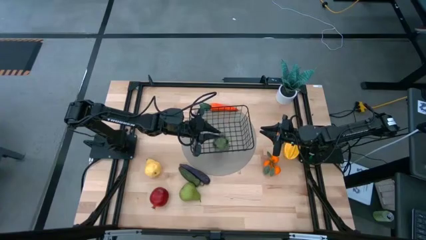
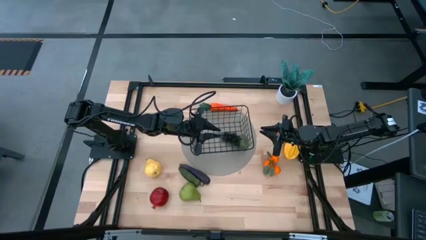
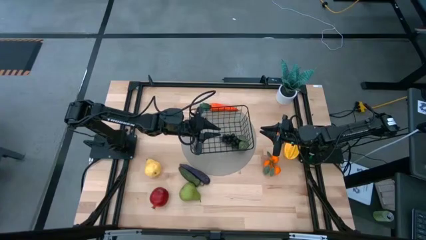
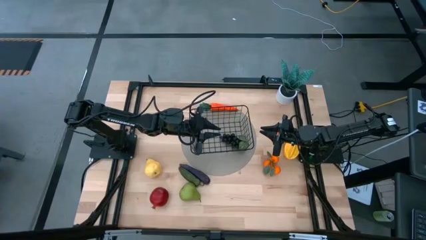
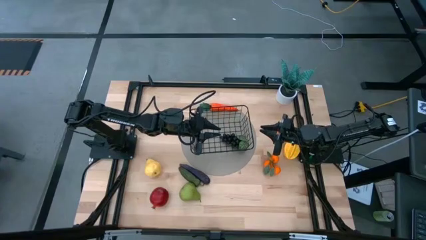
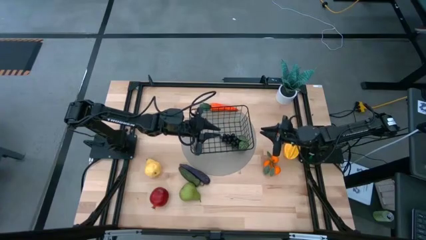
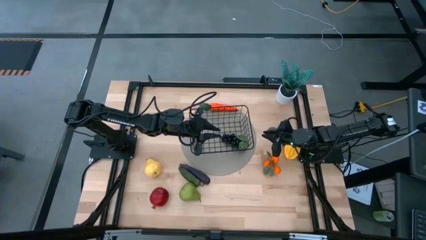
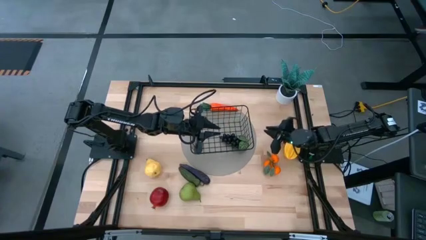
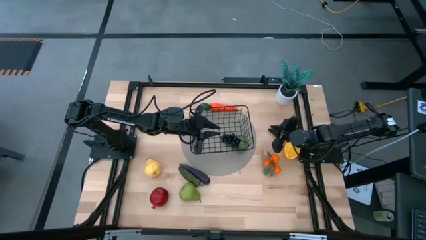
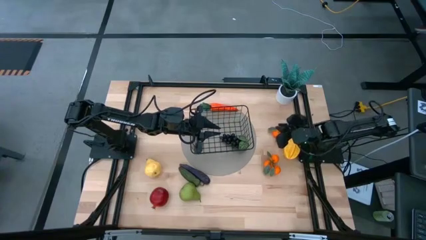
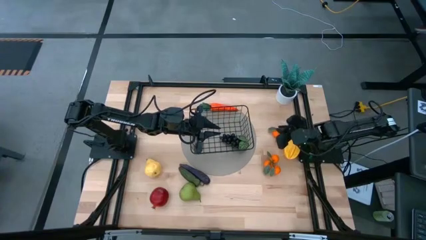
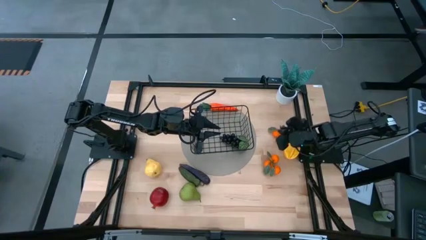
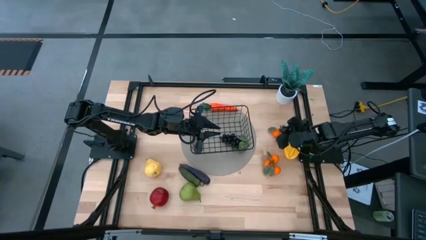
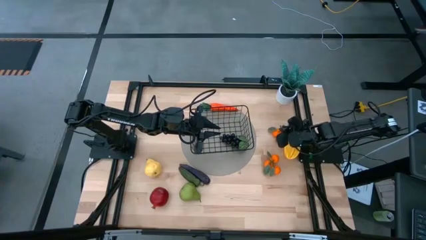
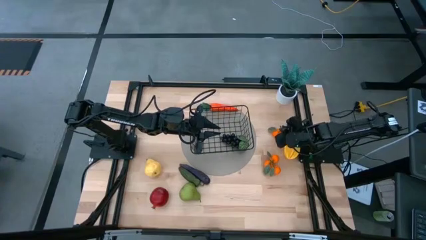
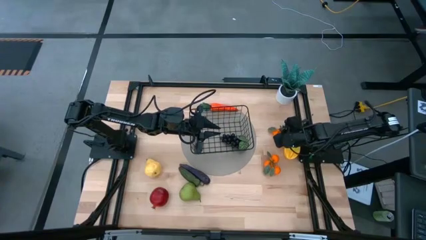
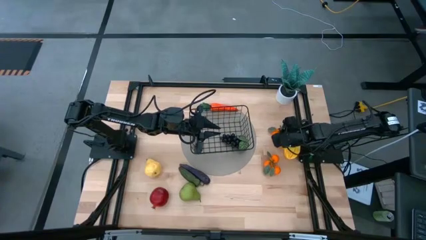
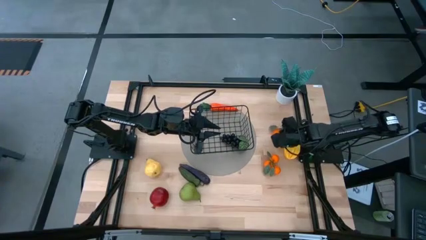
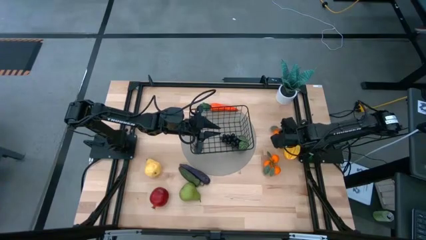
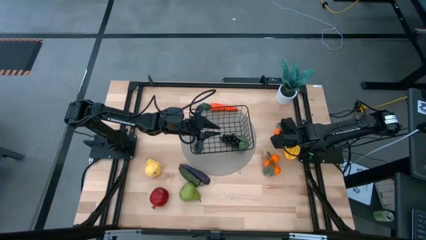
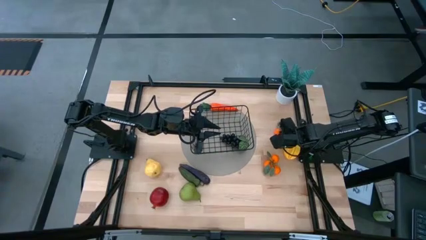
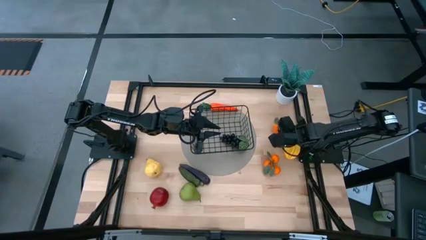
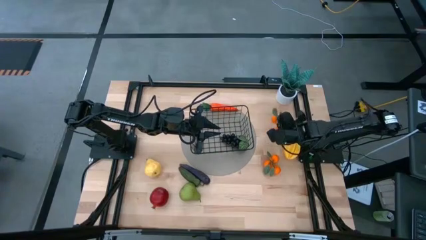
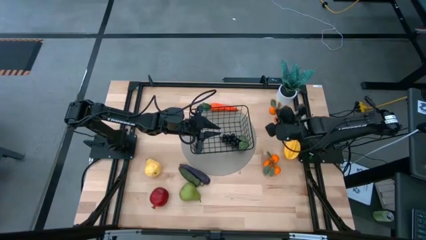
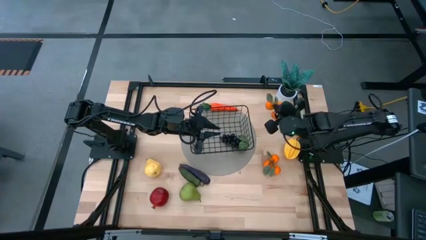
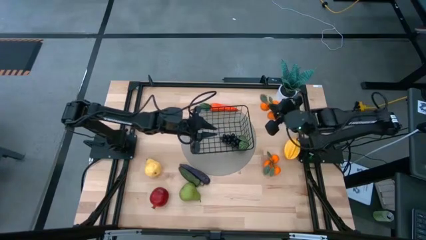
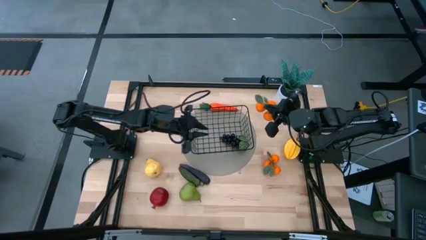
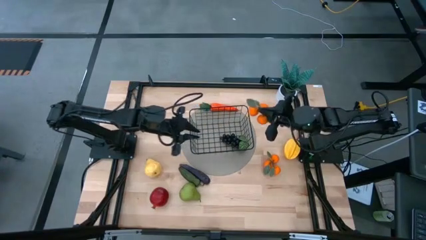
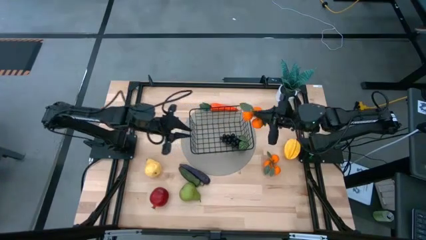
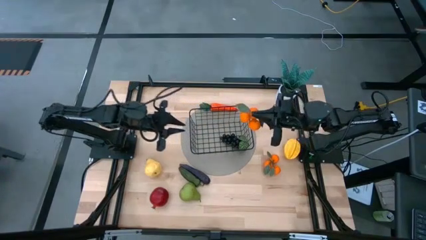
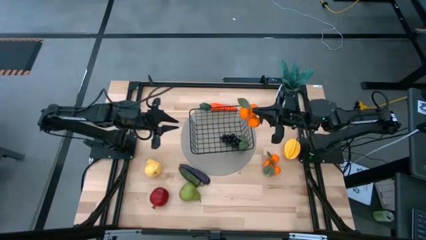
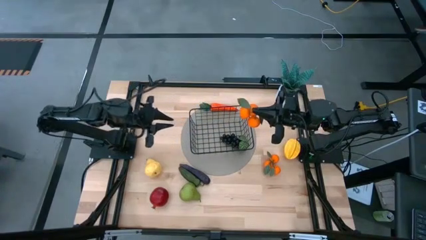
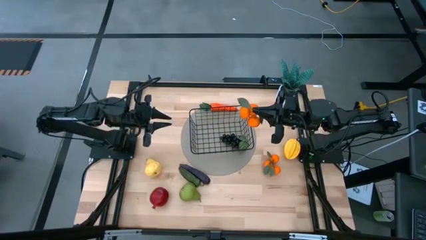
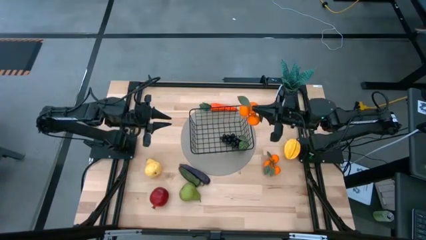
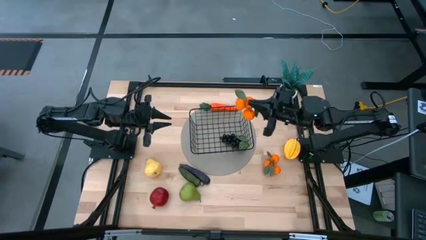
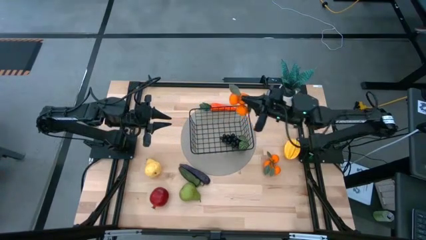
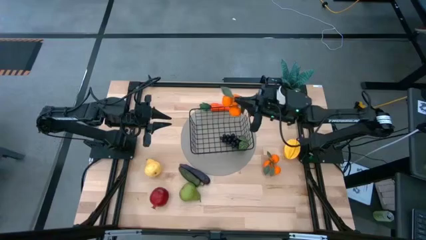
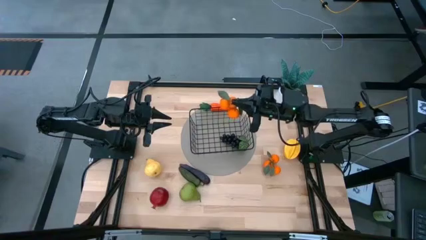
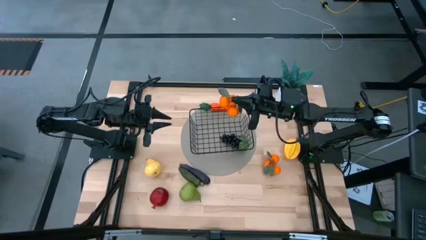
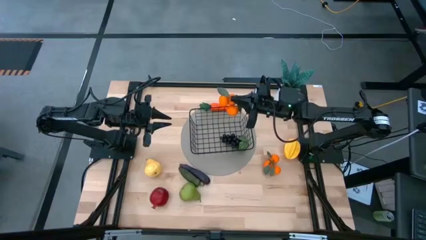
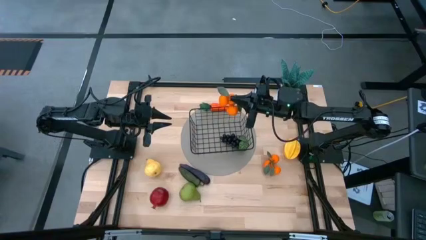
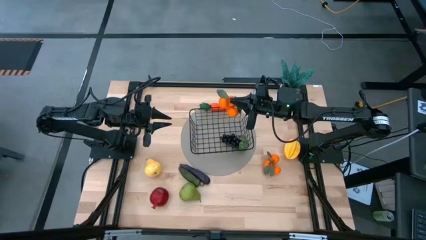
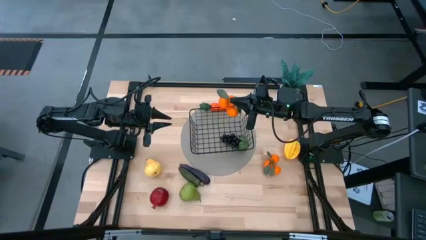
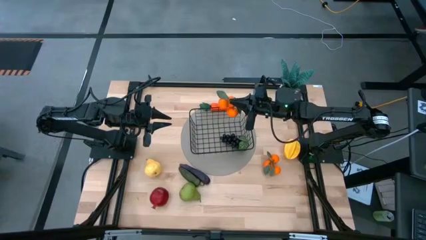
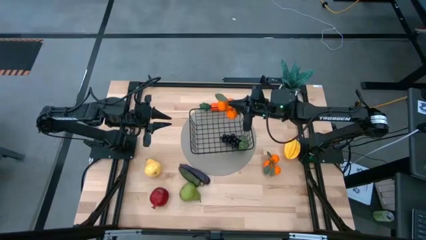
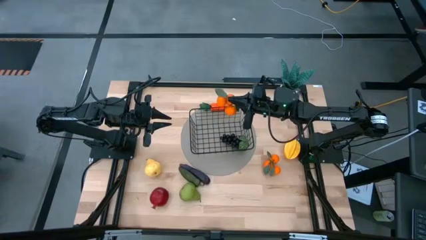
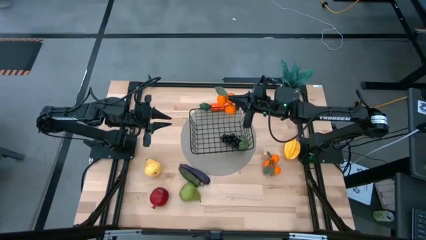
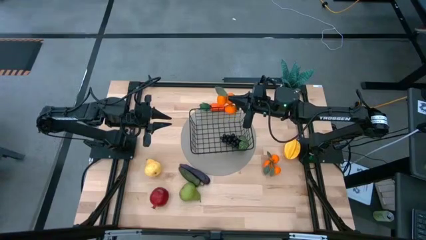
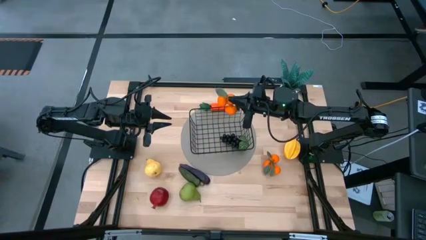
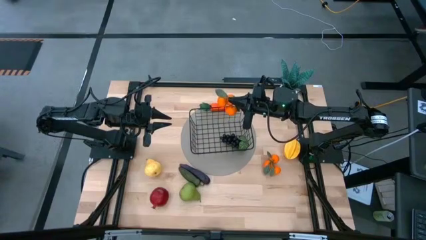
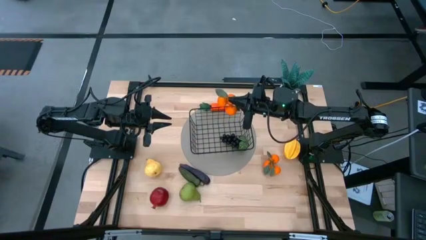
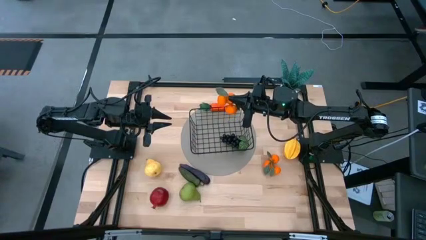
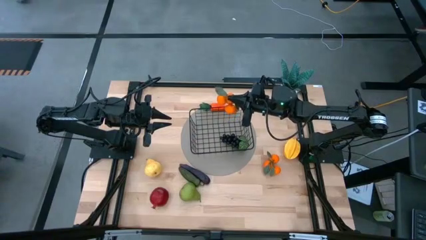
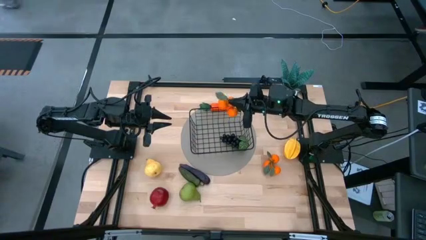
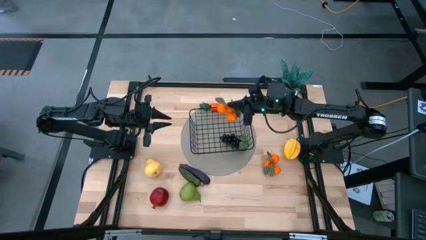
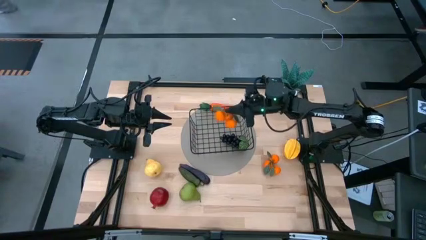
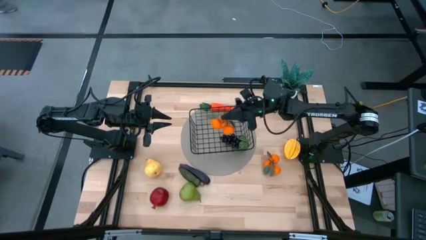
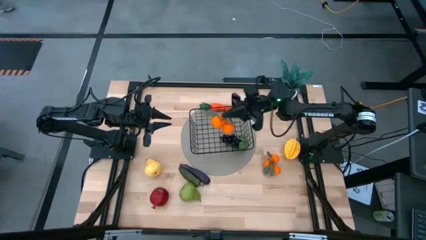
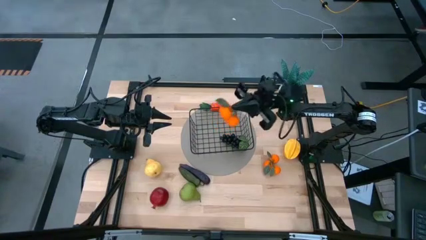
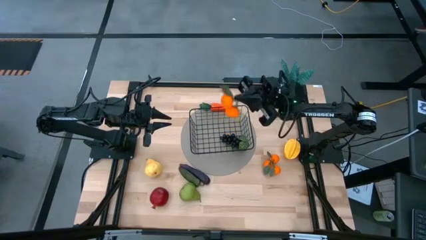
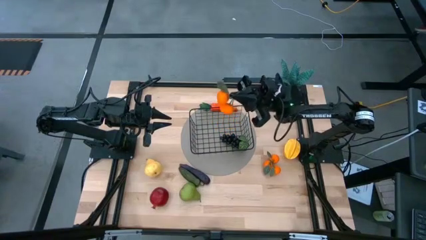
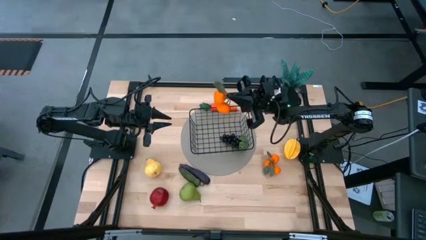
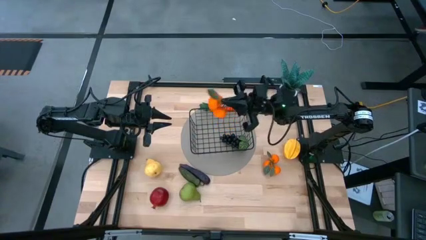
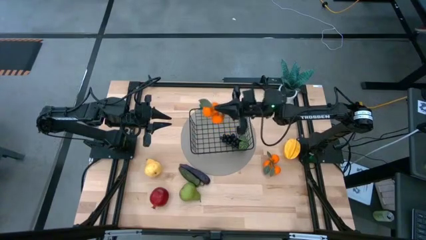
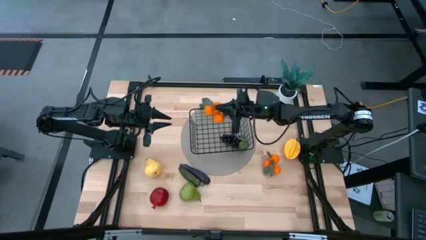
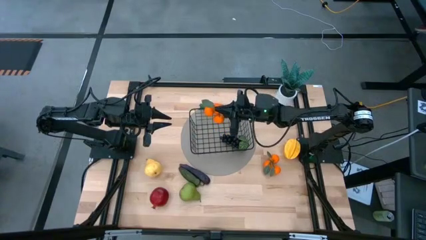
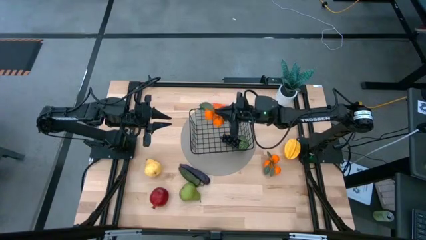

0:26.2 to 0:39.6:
Task: Build produce basket
Put the top bunch of tangerines in the mesh basket

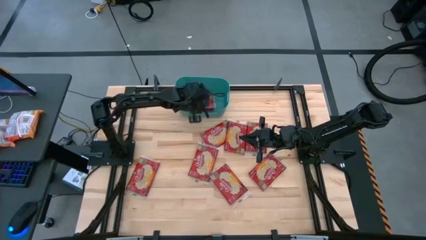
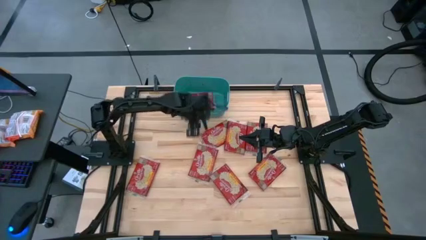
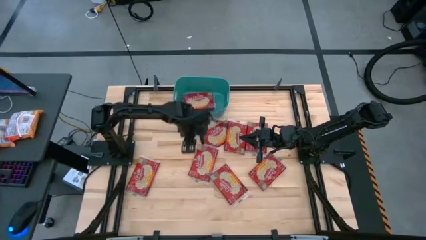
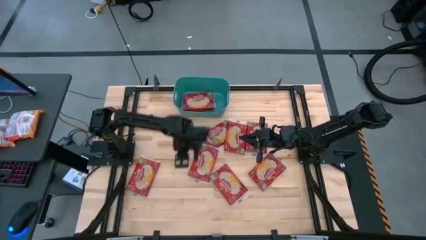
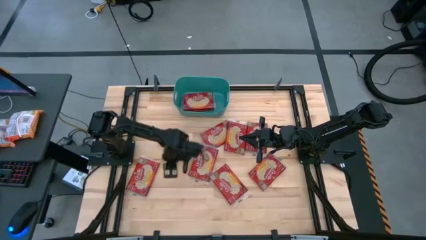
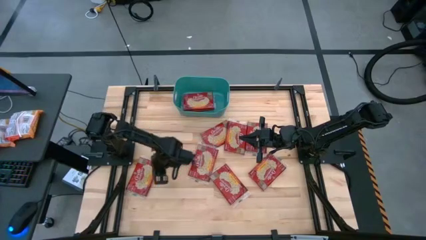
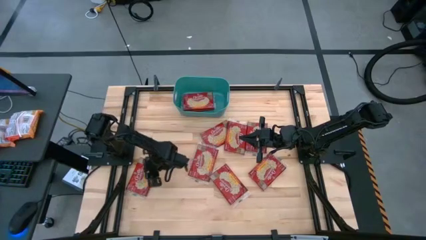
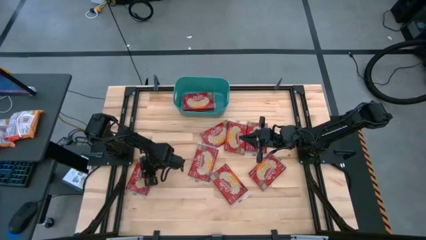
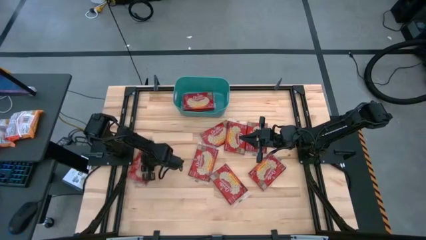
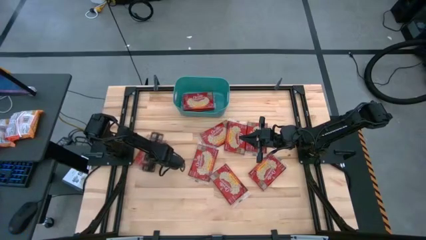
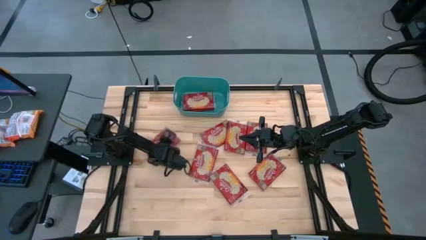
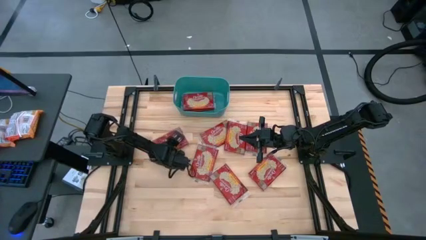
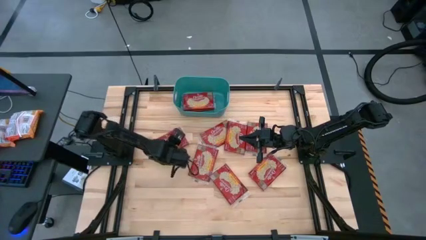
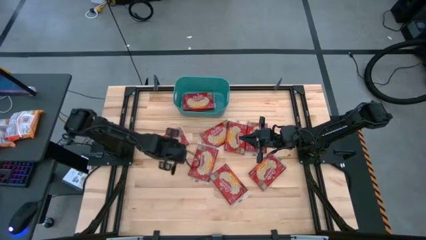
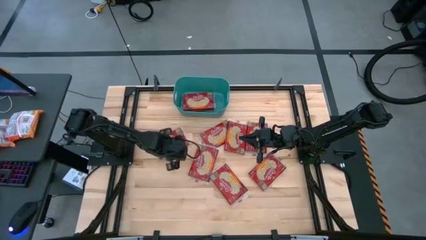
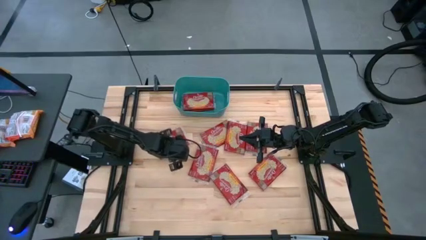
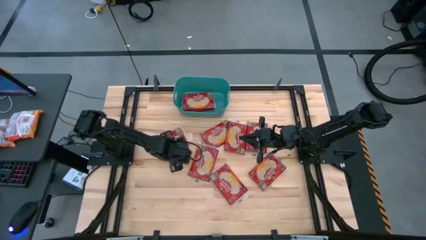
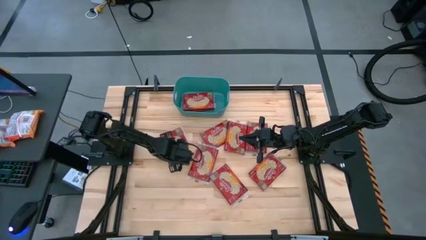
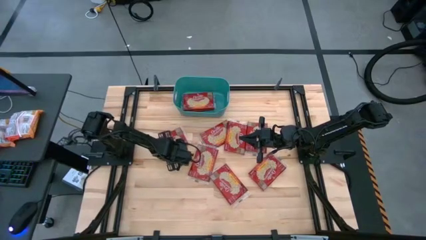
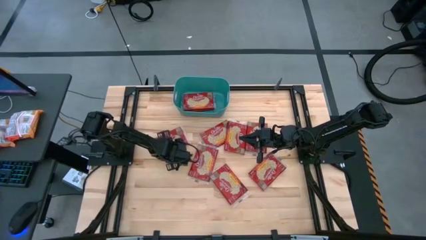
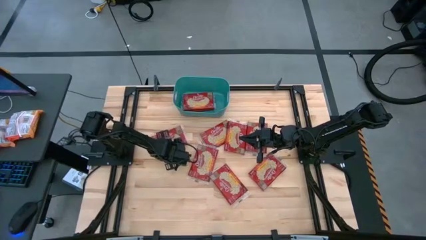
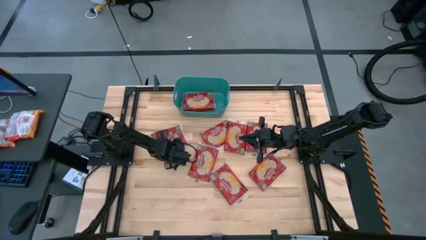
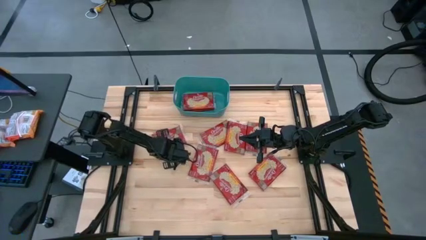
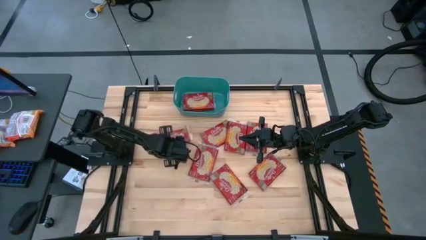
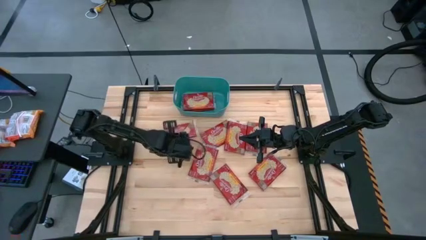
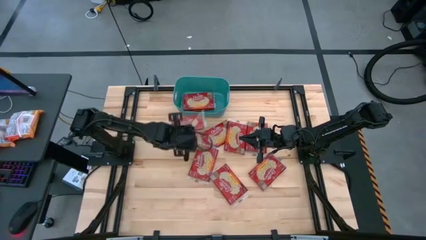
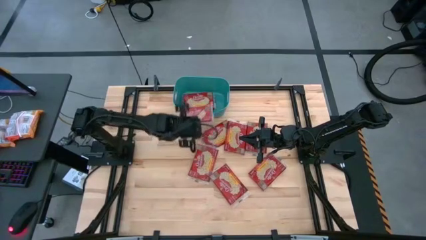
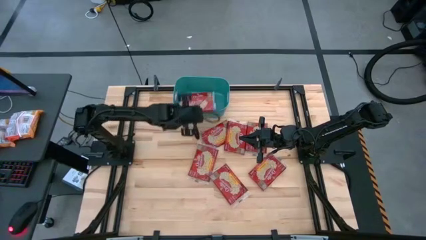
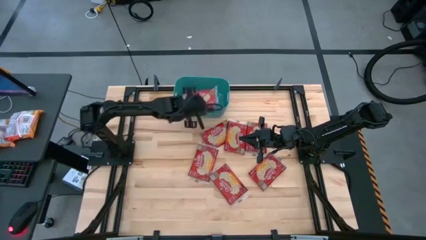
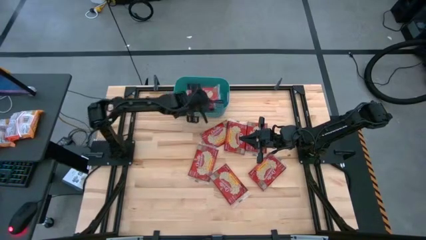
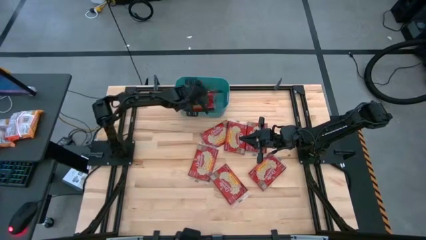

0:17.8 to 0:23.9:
Task: Sort popcorn bags into baskets
Put the popcorn bag into the green bin
